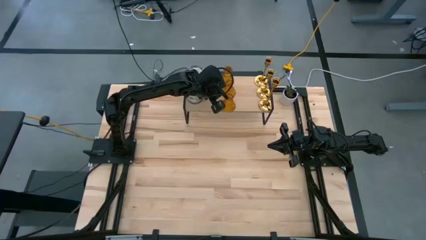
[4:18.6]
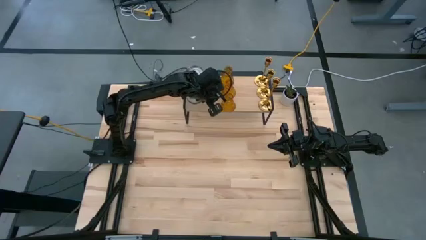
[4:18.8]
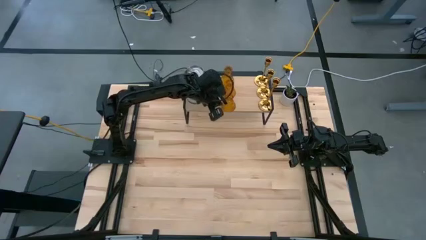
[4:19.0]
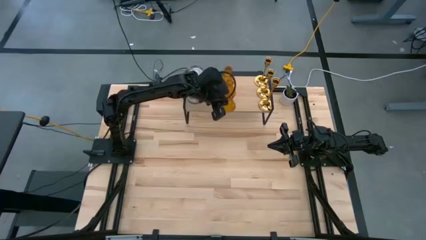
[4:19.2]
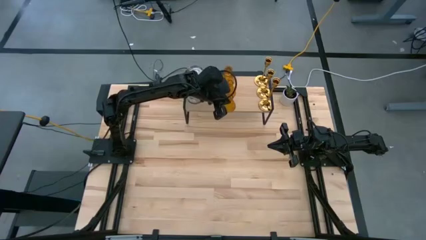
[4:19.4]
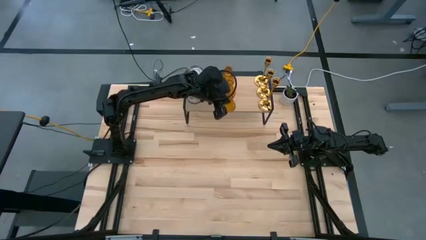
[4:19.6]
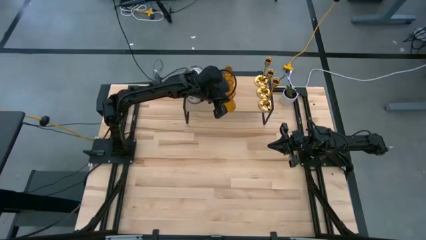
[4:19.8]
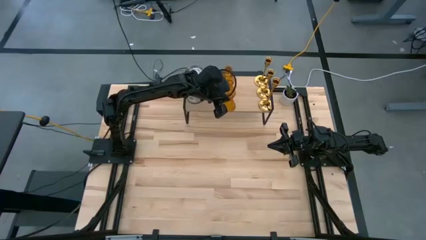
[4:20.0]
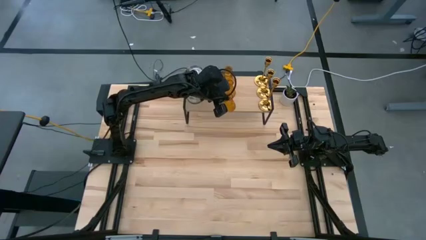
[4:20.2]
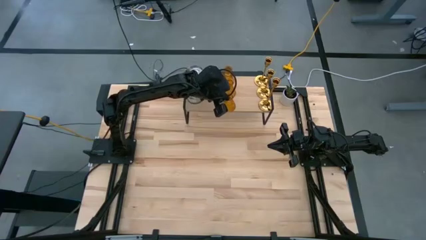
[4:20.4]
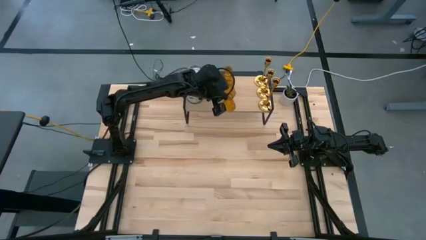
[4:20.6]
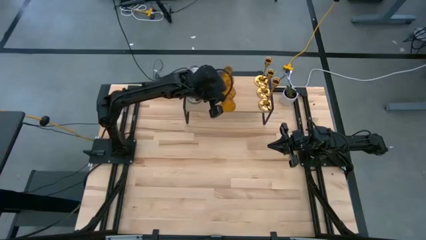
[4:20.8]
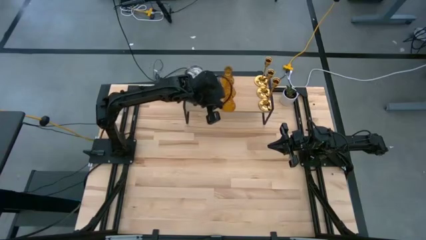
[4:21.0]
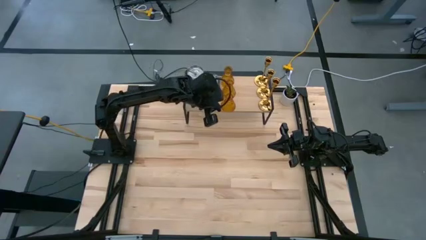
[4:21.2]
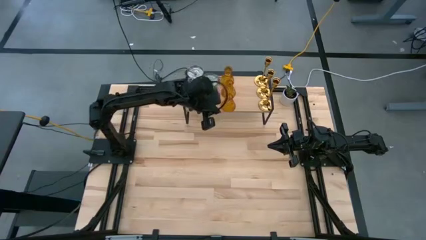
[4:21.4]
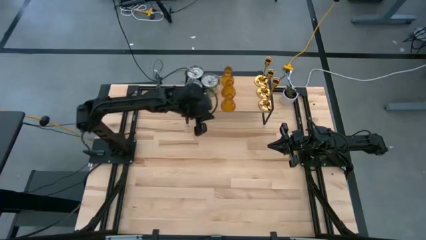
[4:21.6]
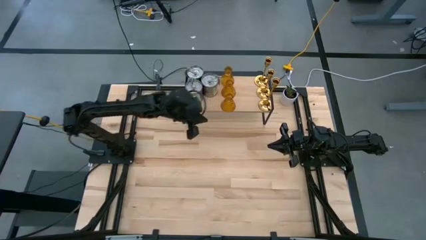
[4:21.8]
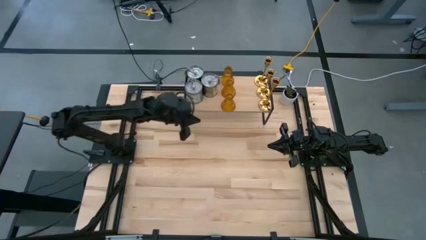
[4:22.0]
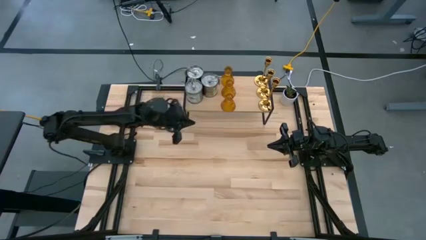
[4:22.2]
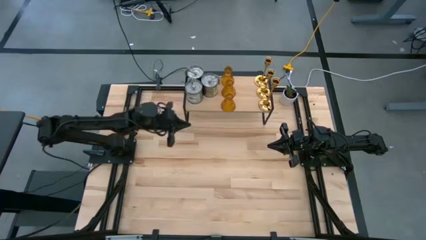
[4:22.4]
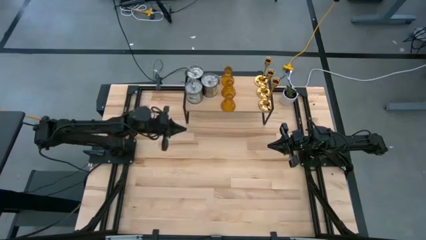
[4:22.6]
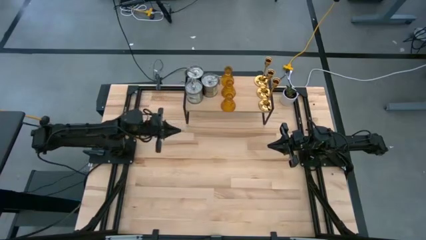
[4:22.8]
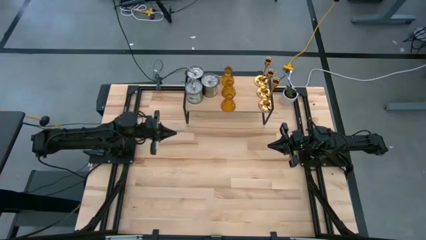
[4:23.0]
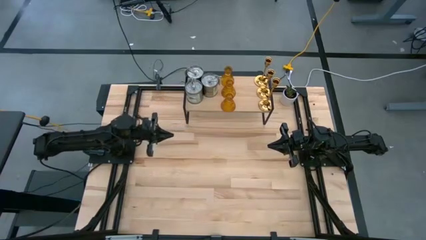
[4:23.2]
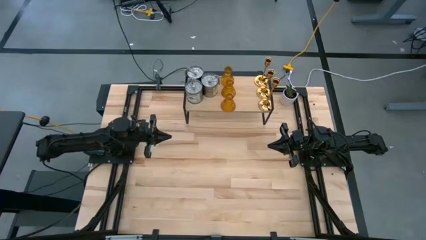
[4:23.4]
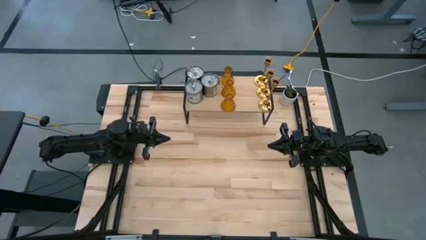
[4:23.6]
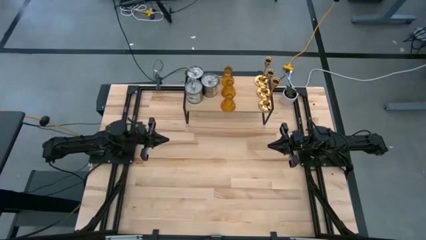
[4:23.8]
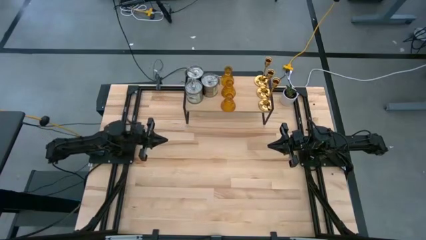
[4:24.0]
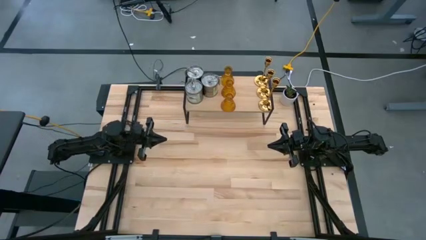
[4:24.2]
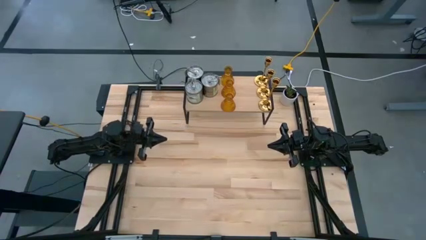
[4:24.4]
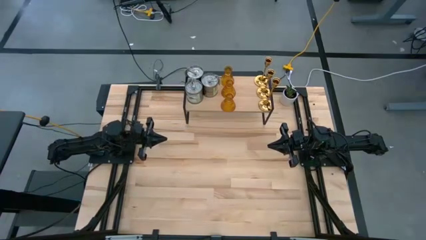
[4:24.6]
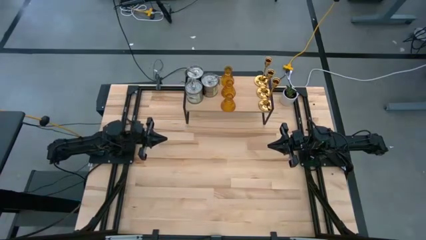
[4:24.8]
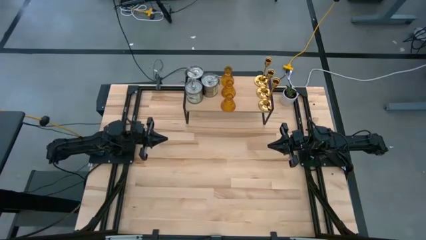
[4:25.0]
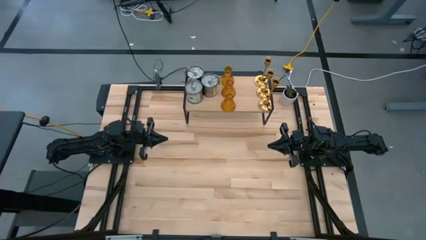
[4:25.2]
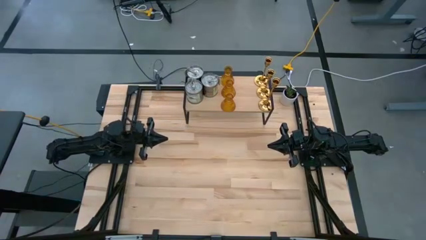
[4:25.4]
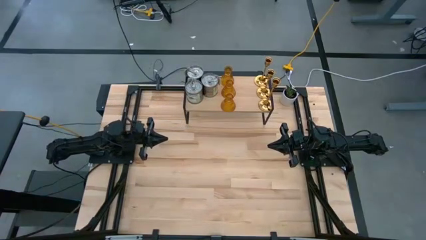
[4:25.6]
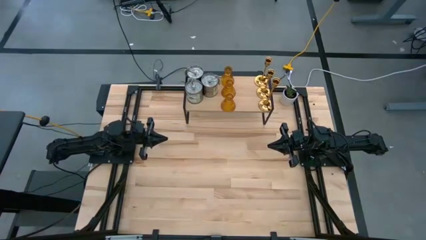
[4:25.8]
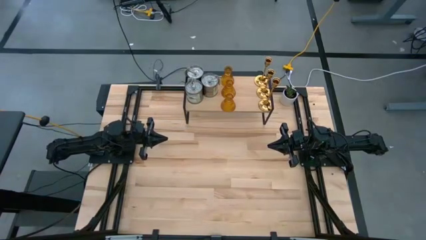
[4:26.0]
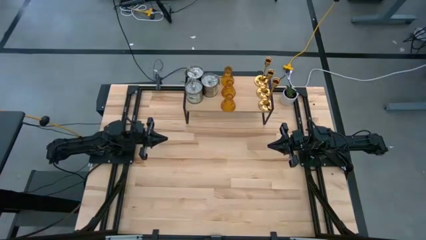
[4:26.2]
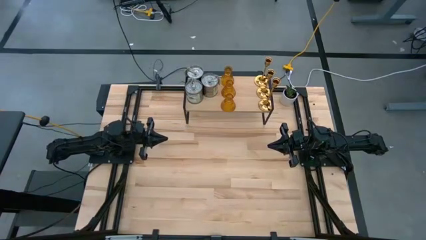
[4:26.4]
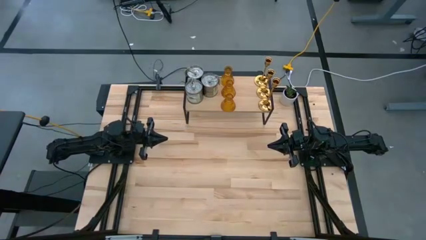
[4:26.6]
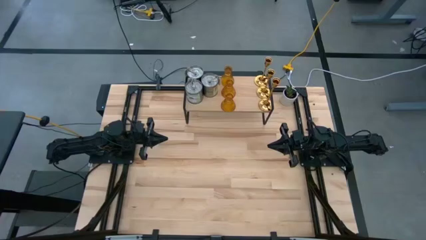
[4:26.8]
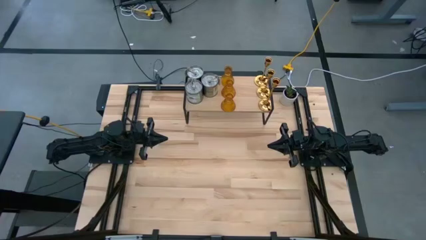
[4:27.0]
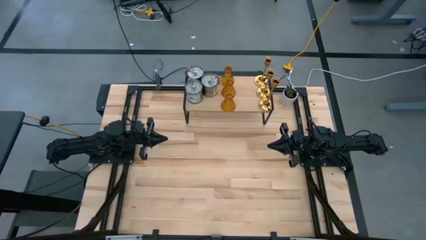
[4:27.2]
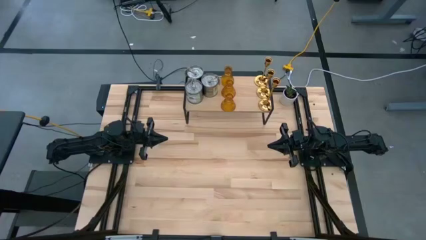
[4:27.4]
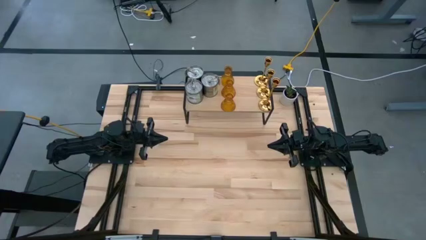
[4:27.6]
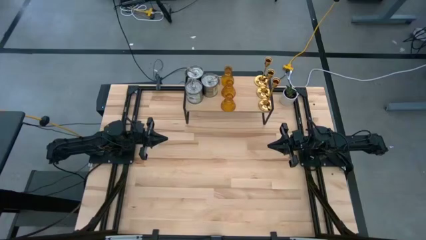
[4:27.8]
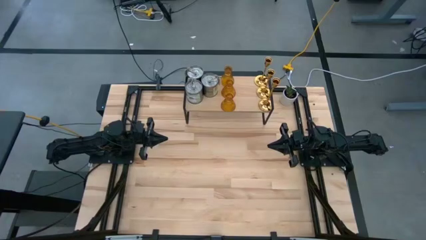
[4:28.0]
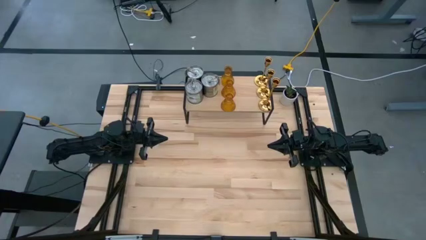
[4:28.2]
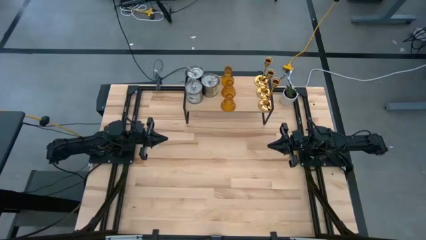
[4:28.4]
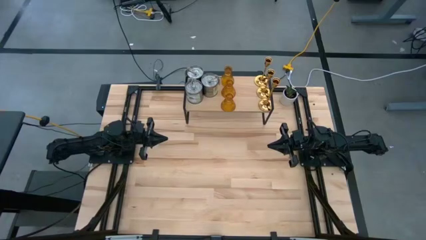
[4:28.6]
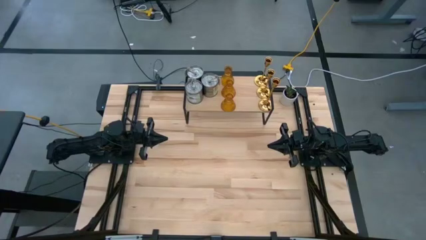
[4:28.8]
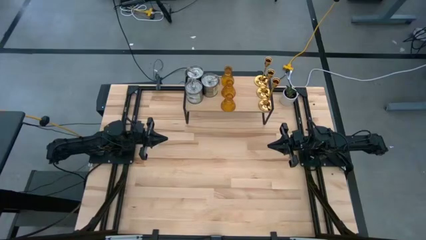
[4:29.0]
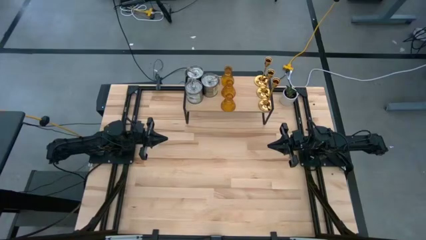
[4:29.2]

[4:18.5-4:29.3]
Task: Pick & Place candle stick holders
Return to Home Position

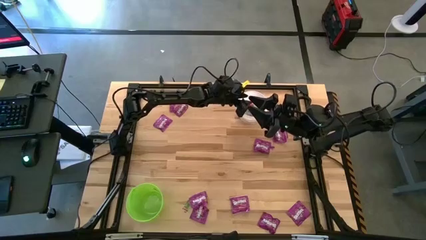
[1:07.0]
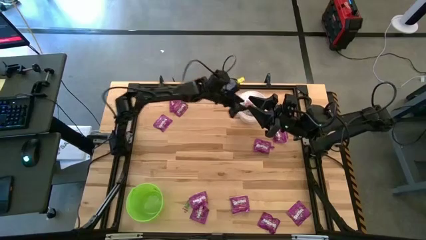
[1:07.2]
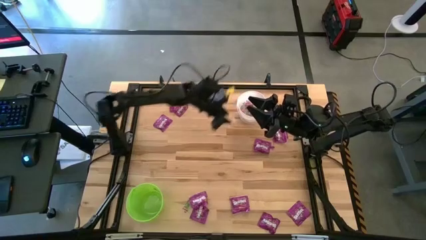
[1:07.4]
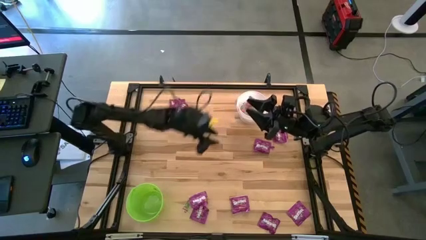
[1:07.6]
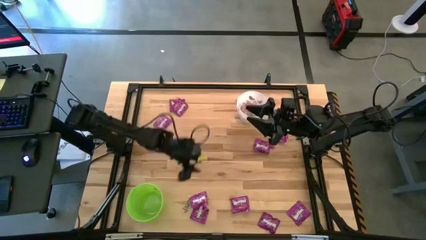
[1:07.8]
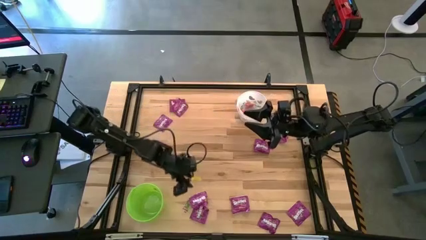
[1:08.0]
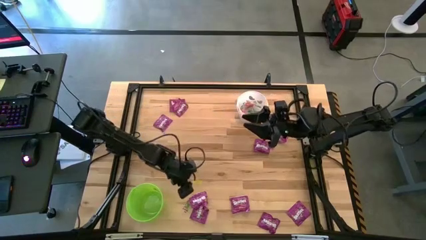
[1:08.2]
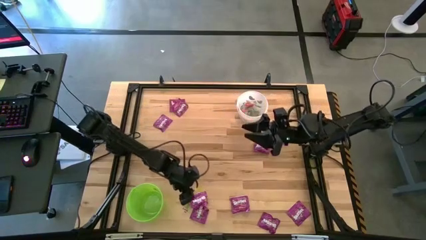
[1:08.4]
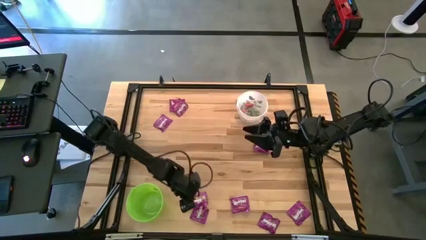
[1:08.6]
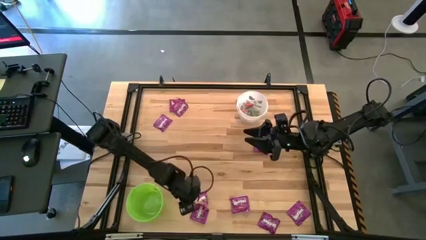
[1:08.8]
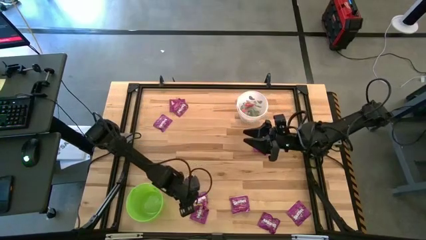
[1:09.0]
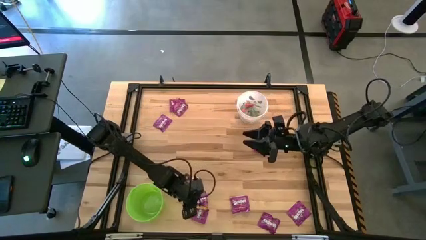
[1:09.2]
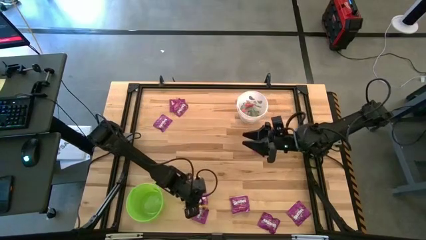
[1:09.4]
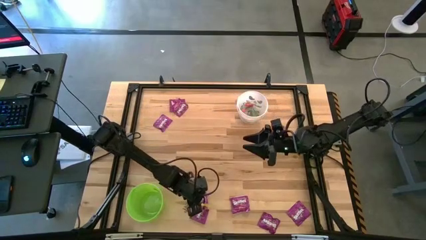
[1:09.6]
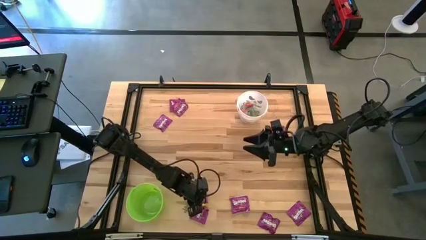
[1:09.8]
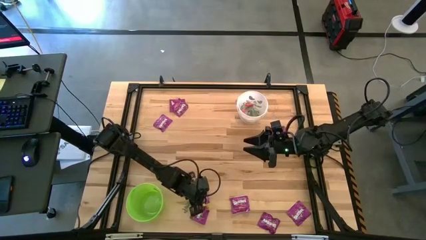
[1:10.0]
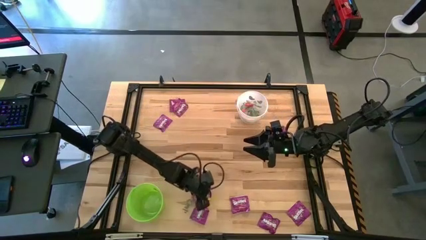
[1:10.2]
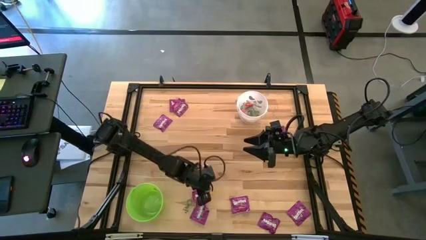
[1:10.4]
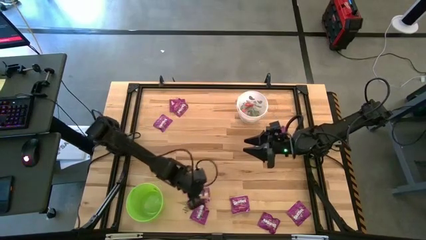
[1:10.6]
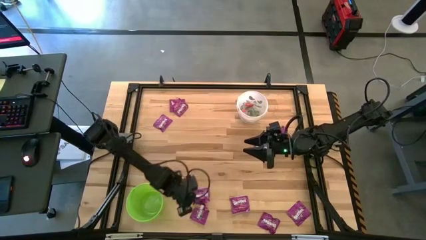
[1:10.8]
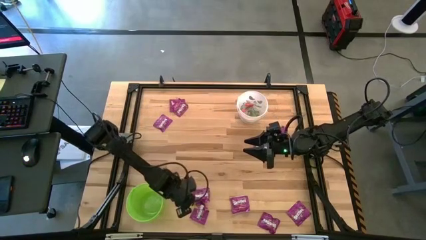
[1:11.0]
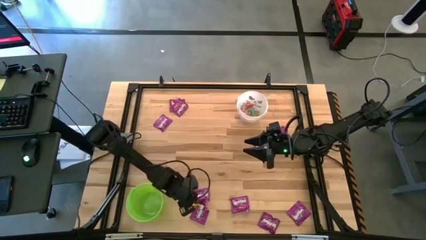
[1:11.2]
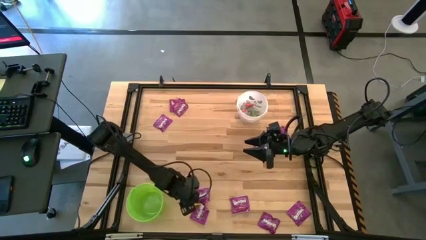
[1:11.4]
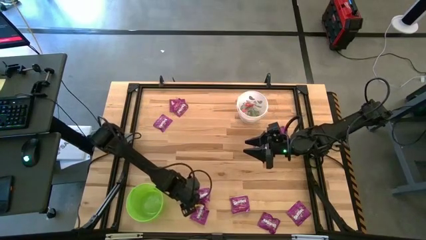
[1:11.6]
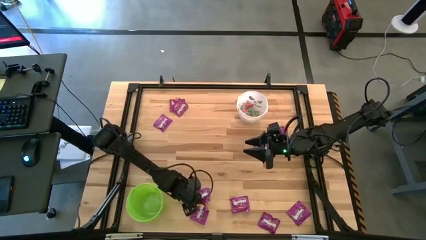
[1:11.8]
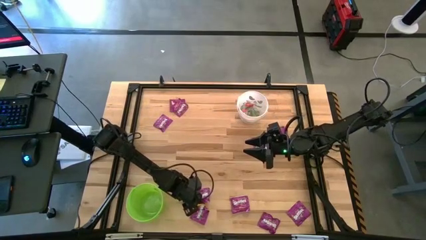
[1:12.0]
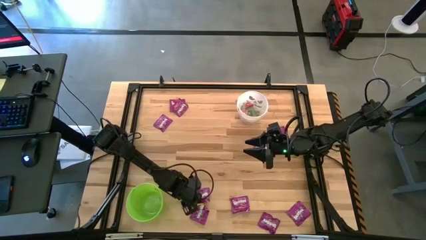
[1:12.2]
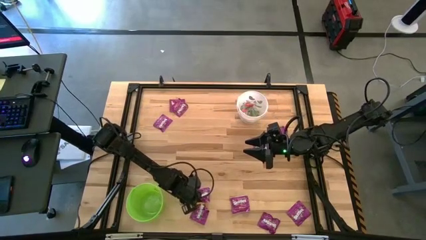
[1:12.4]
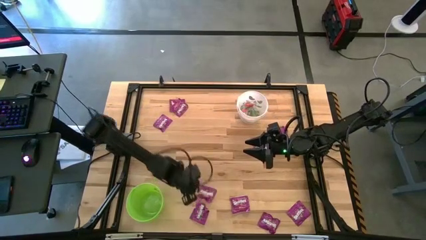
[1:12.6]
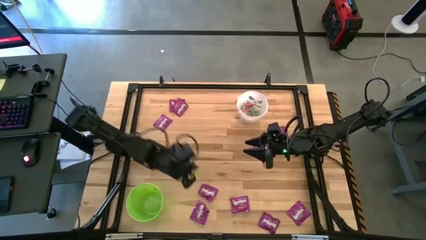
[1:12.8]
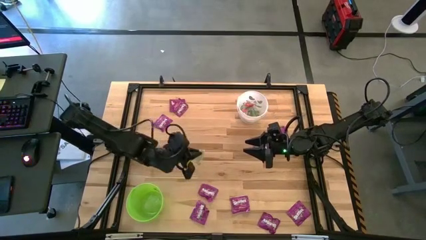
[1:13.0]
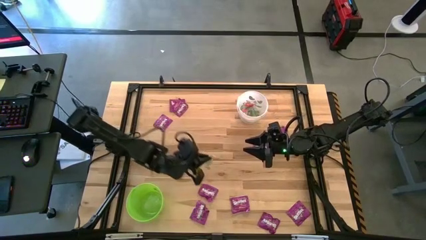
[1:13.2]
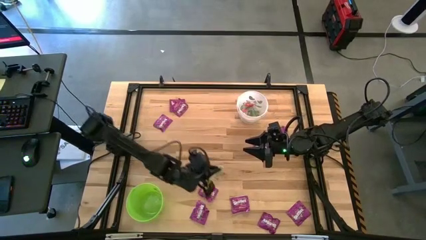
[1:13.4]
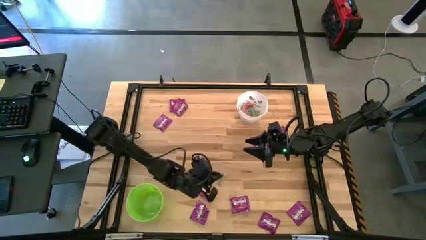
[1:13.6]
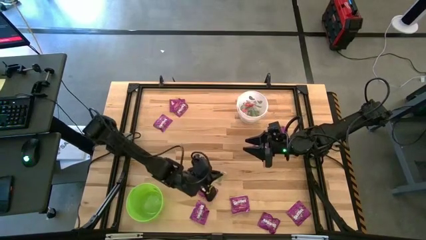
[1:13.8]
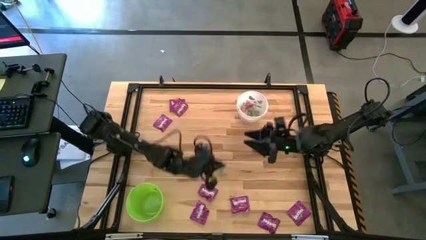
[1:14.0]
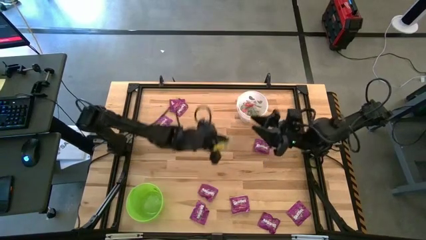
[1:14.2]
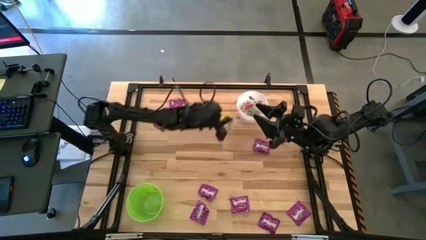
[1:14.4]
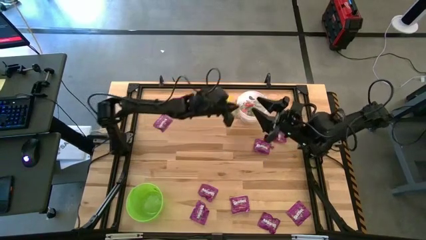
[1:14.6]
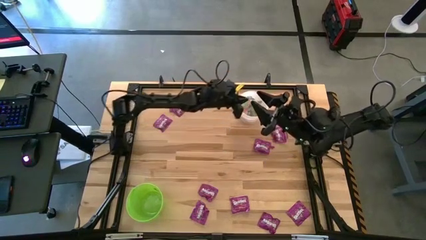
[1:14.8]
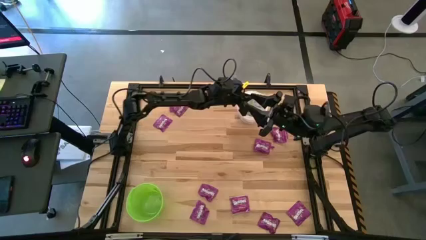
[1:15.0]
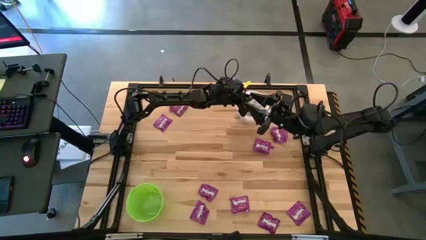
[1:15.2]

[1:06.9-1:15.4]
Task: Sort candy by brand, put in halloween buckets
Put the red gummy into the white bucket
